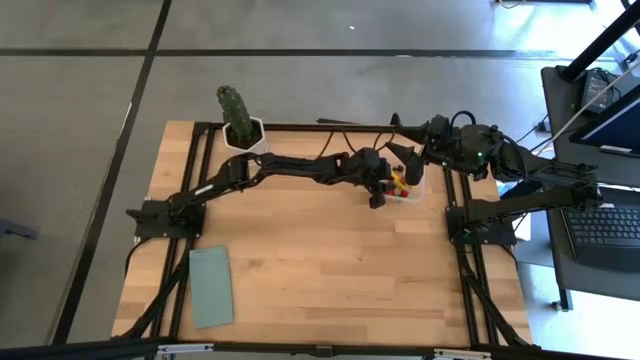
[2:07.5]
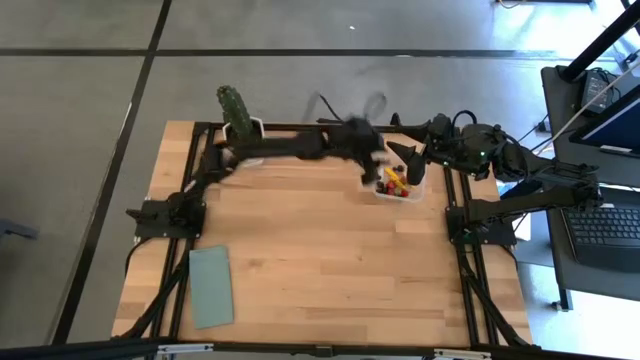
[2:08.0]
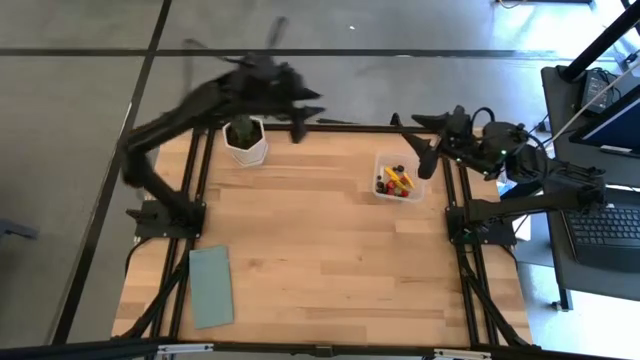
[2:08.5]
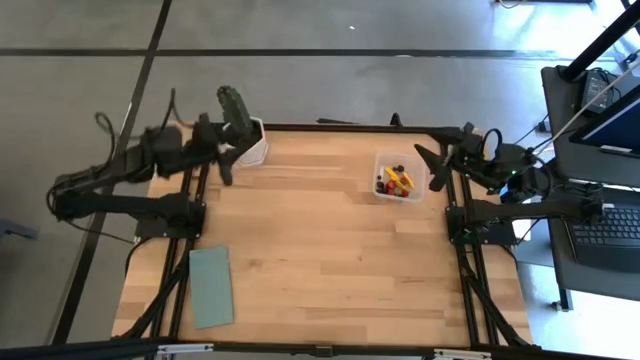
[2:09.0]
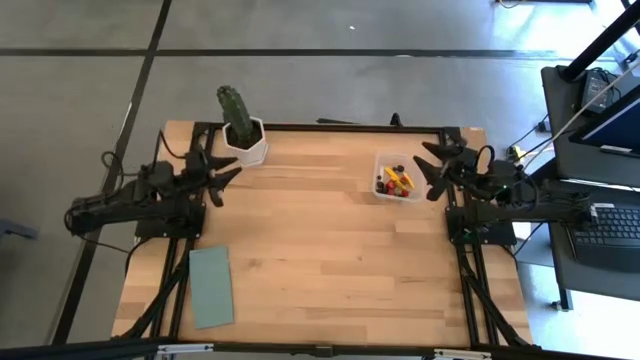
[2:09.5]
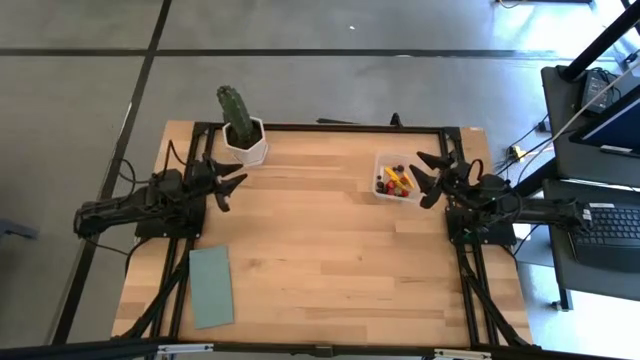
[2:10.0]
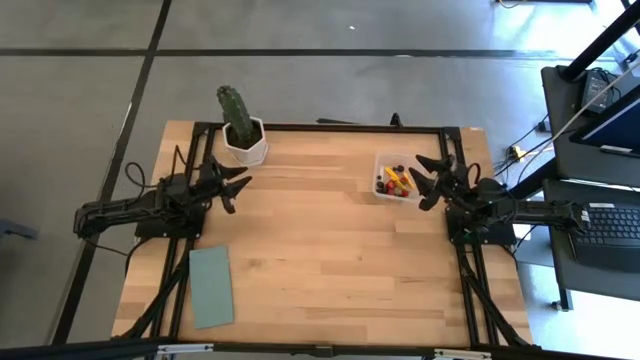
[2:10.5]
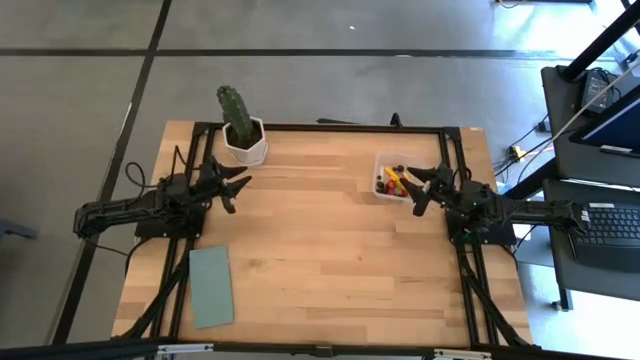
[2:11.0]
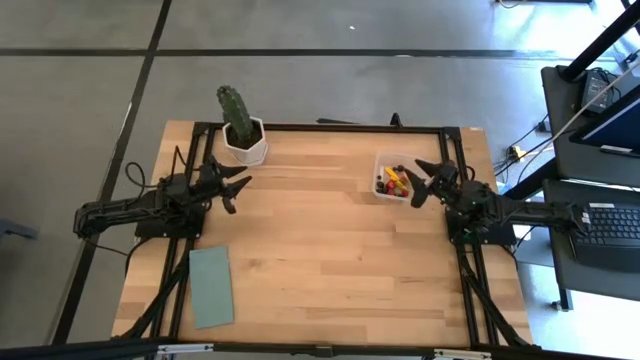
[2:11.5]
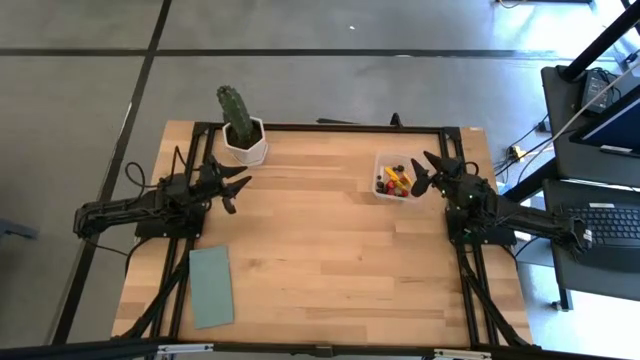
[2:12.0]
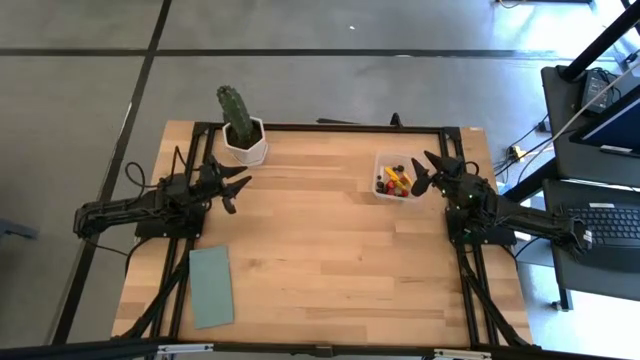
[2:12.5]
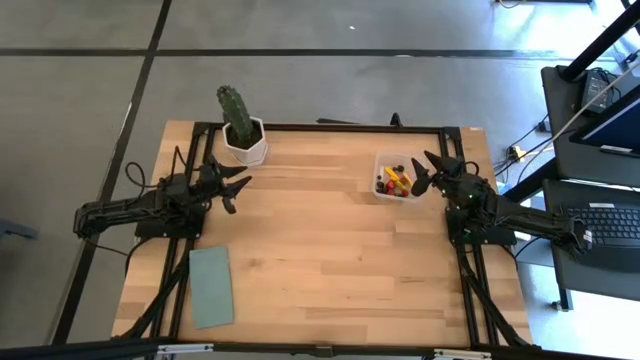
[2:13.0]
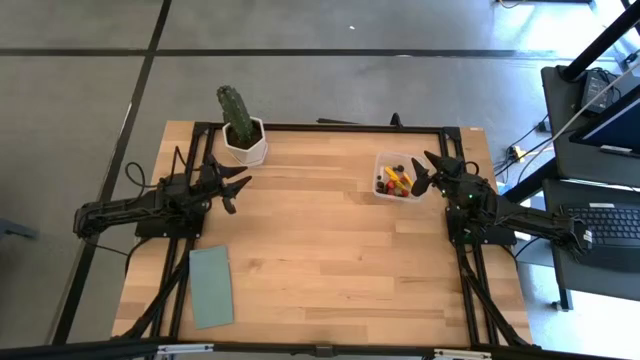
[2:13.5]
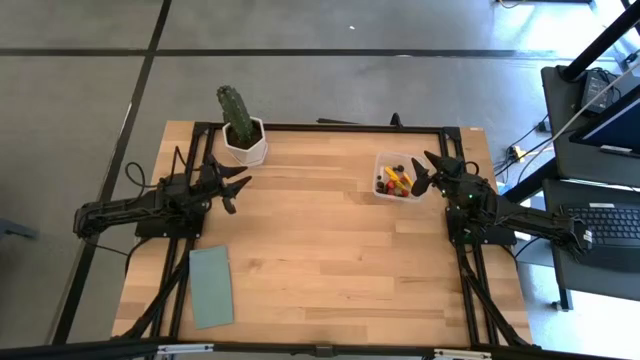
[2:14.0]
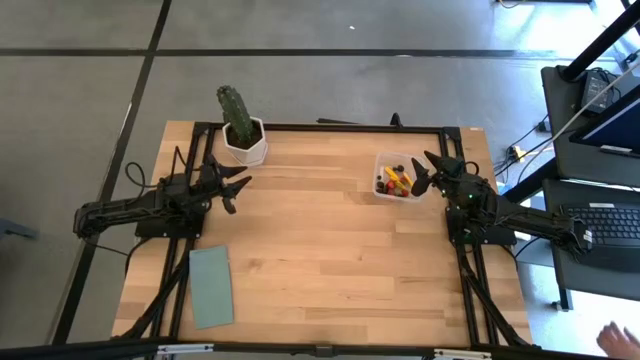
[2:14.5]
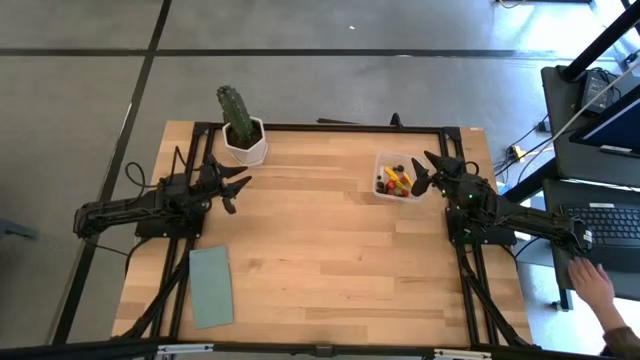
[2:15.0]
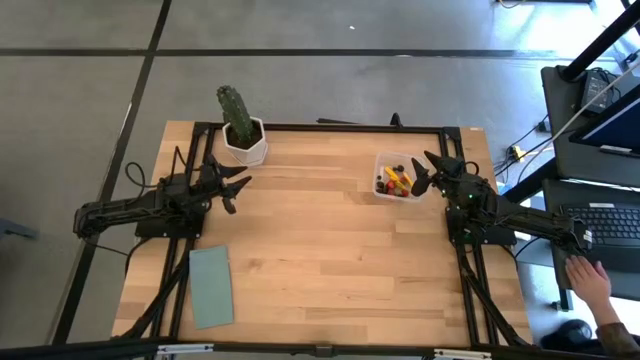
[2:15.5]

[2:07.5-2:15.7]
Task: Pick and placing Produce into tupperware
Return to Home Position

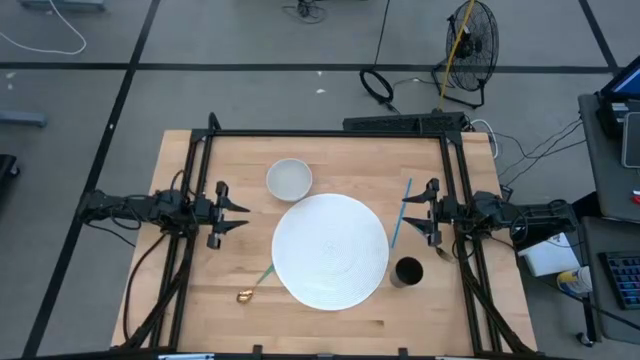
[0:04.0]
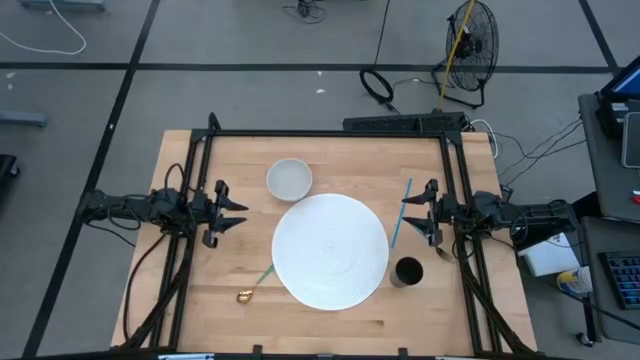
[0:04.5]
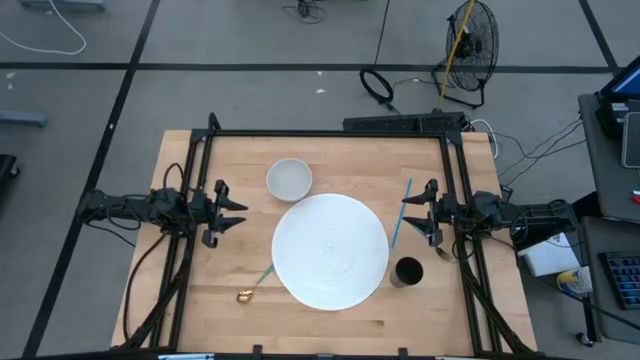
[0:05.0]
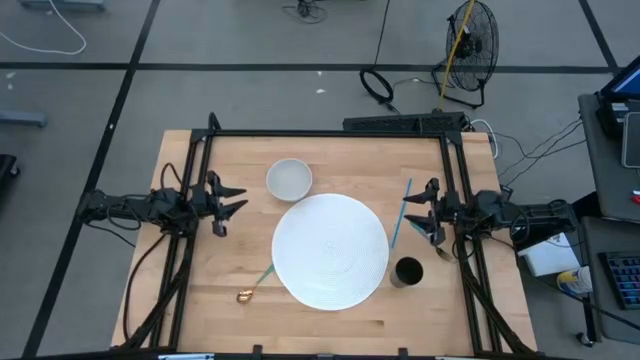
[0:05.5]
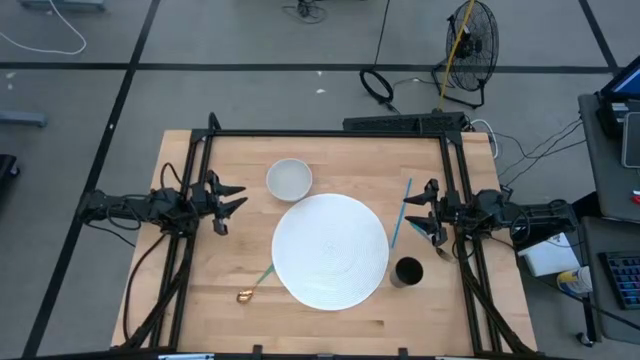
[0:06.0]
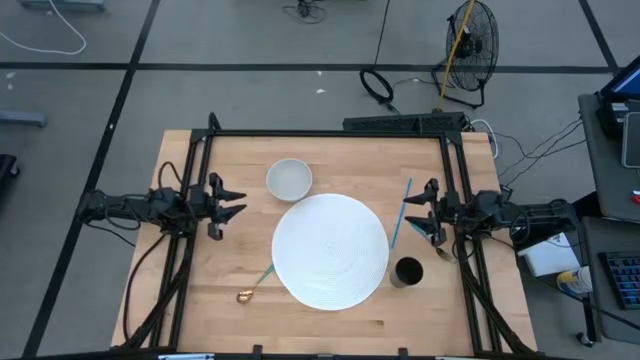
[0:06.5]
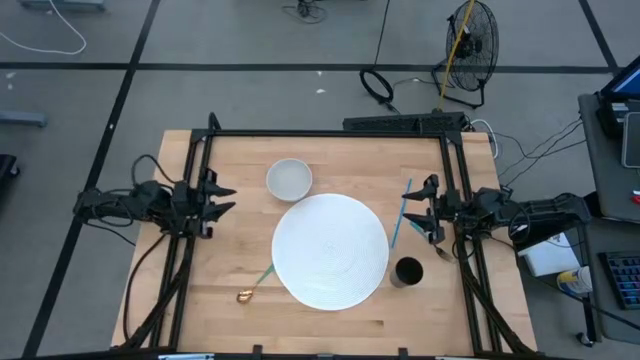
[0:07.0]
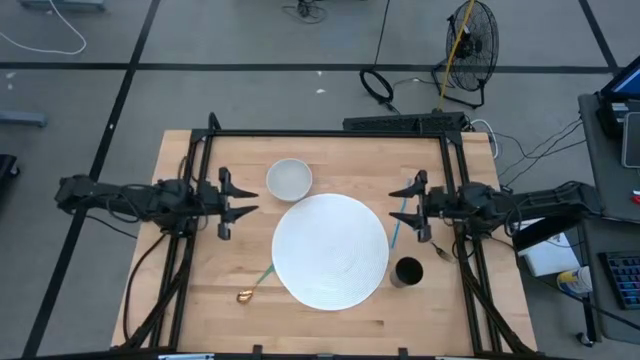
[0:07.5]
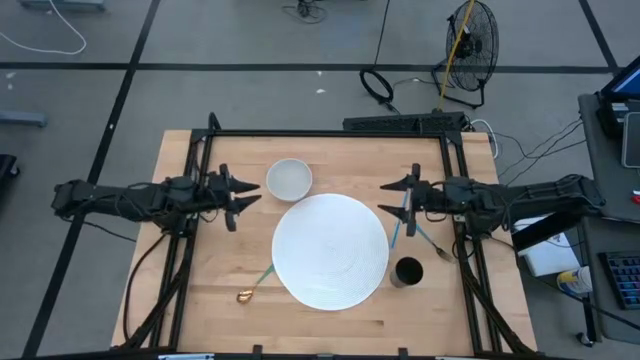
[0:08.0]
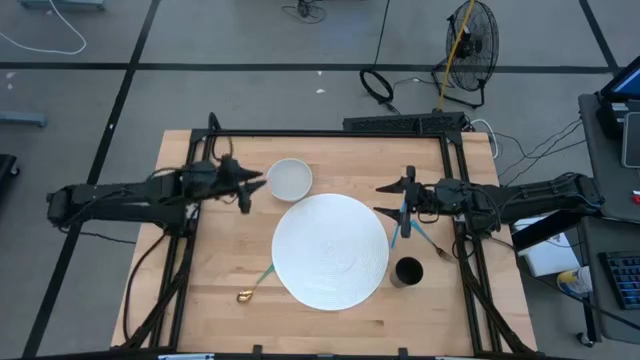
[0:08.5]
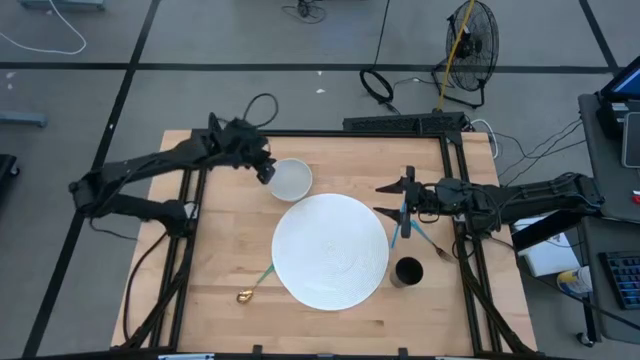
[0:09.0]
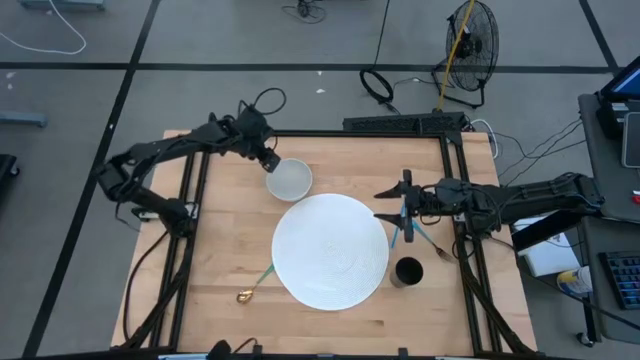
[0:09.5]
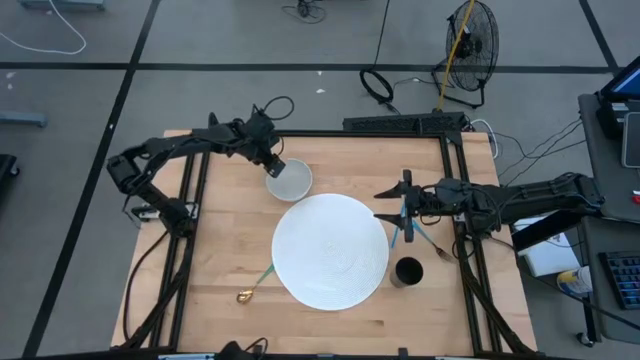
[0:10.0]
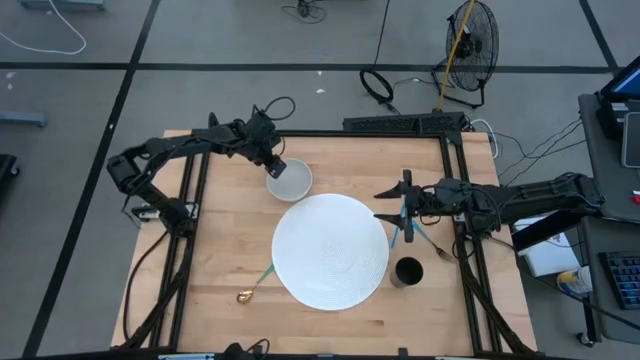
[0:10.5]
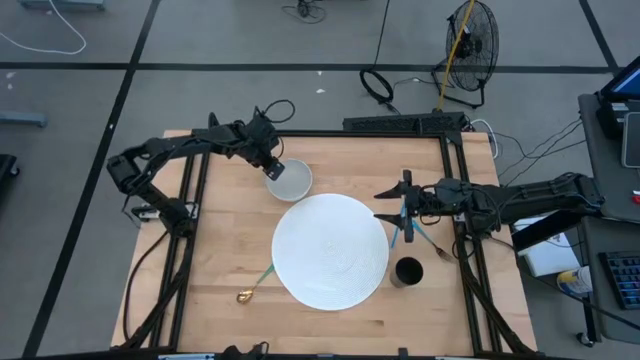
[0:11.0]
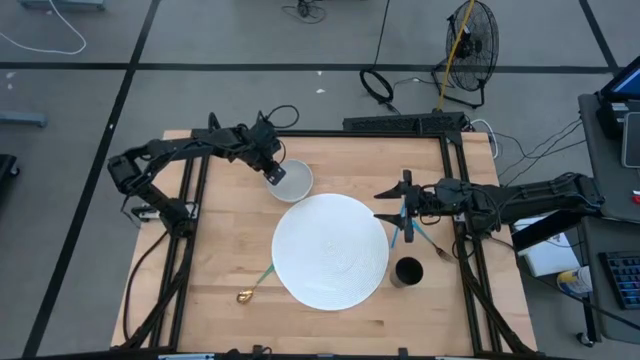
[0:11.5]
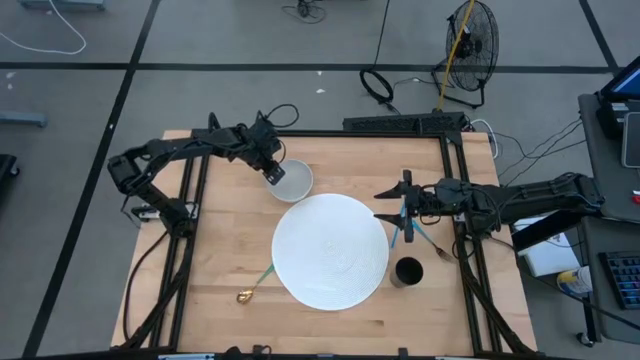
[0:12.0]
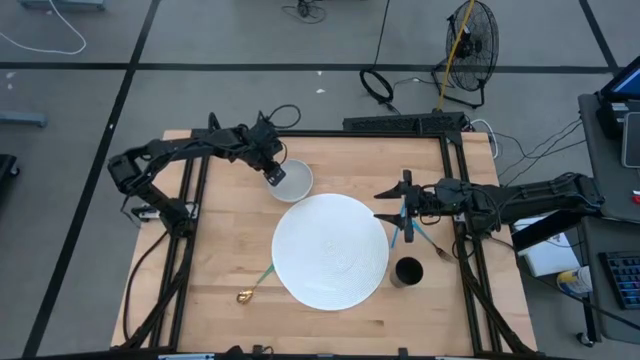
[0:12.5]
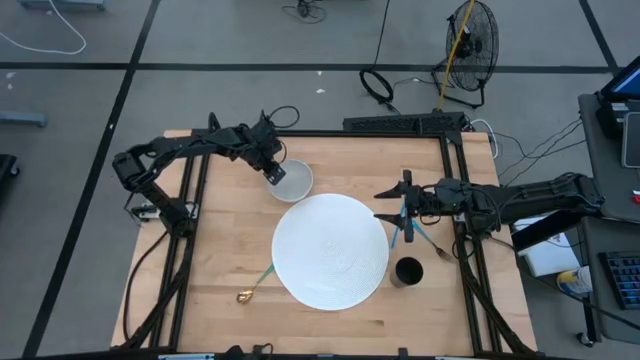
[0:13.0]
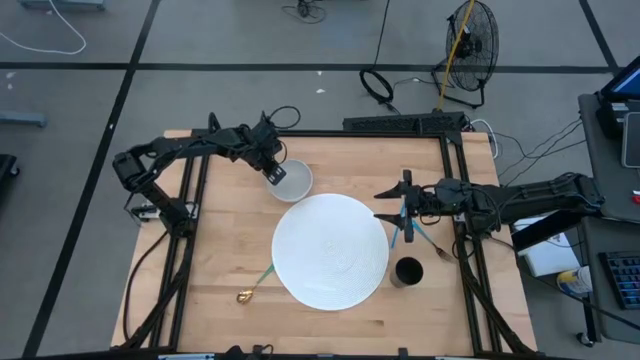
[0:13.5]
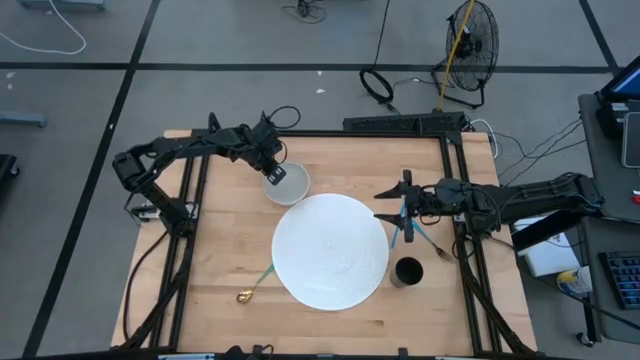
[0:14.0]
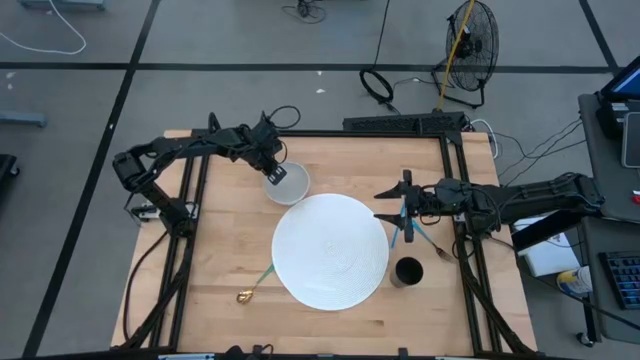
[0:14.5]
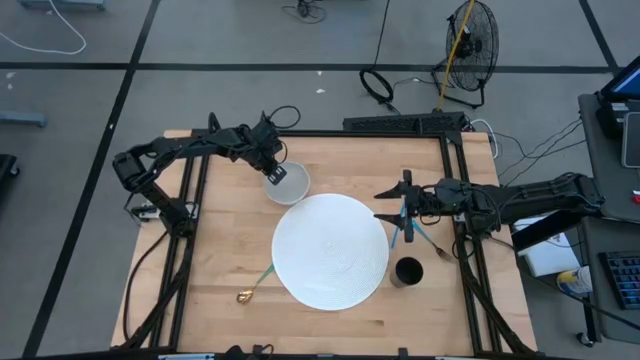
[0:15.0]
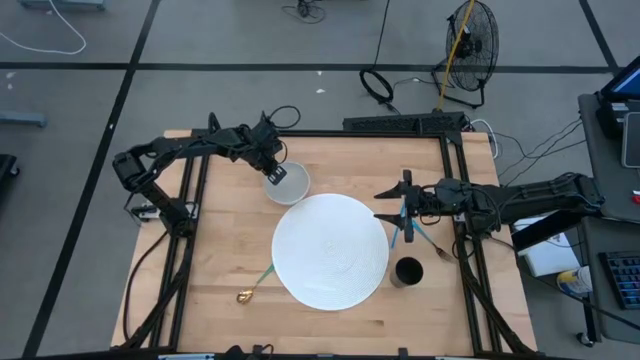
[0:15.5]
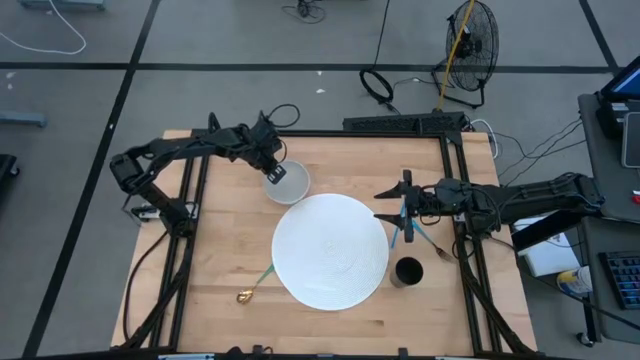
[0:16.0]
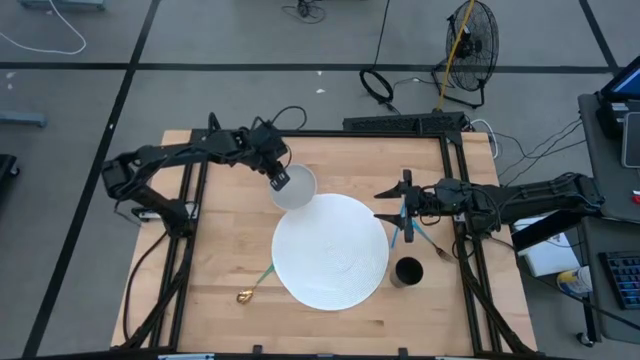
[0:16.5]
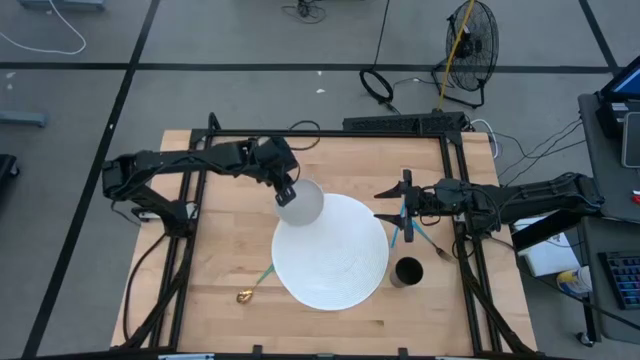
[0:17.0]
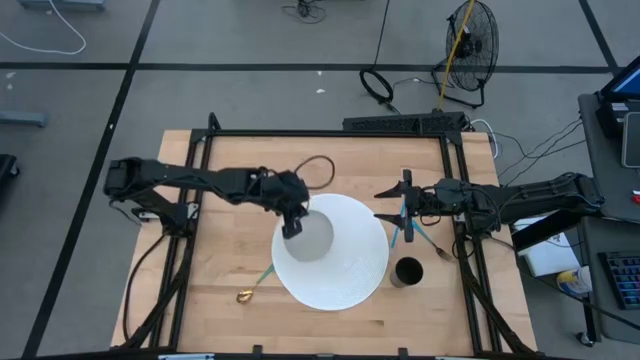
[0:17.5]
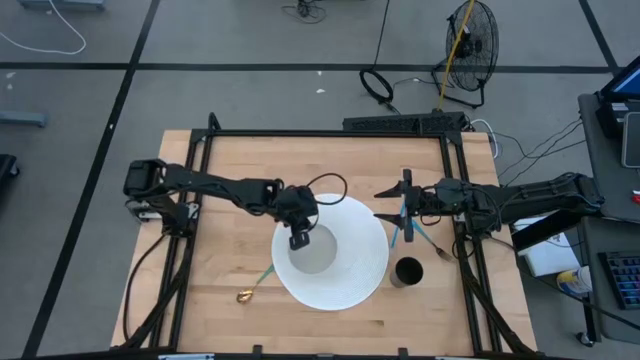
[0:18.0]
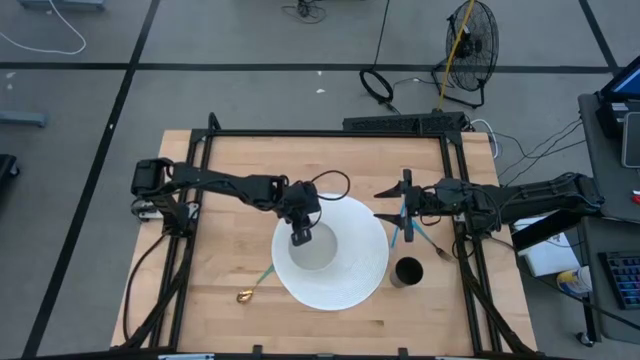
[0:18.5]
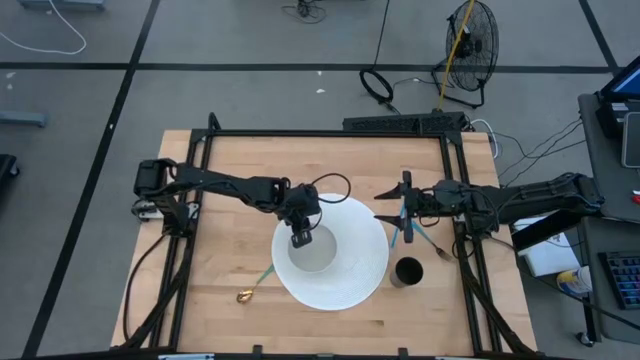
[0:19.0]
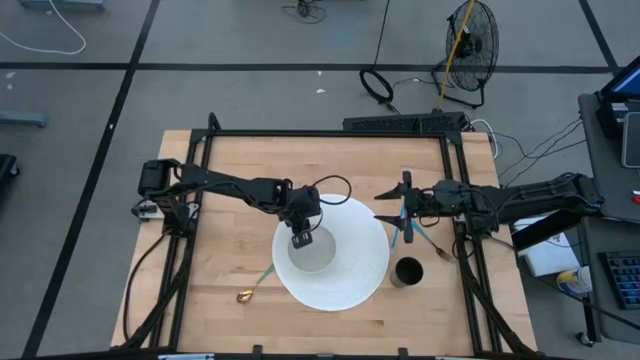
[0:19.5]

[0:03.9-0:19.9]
Task: Pick & Place Utensil
Put the white bowl on the white mat
